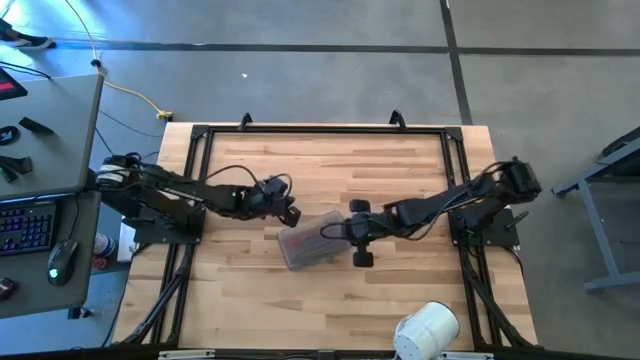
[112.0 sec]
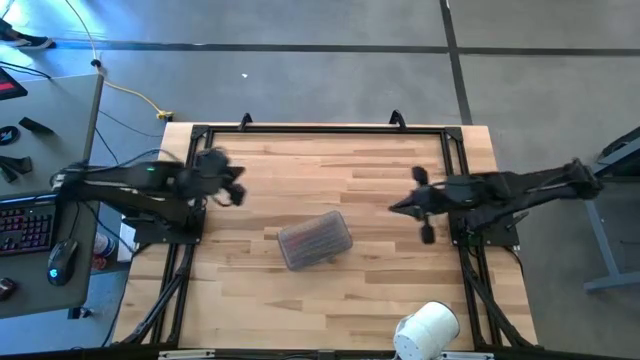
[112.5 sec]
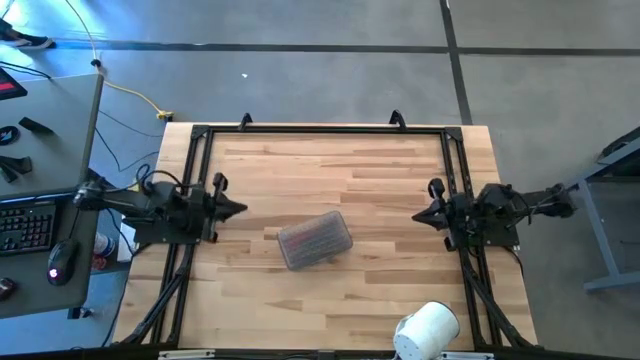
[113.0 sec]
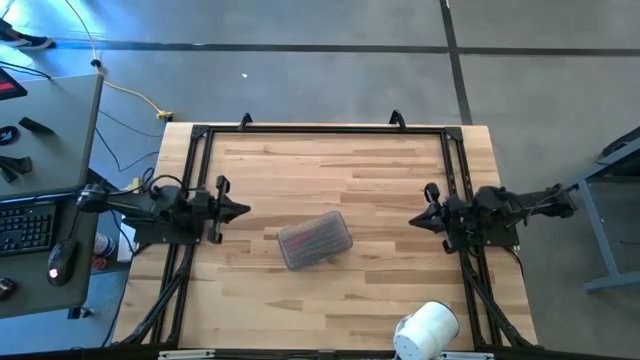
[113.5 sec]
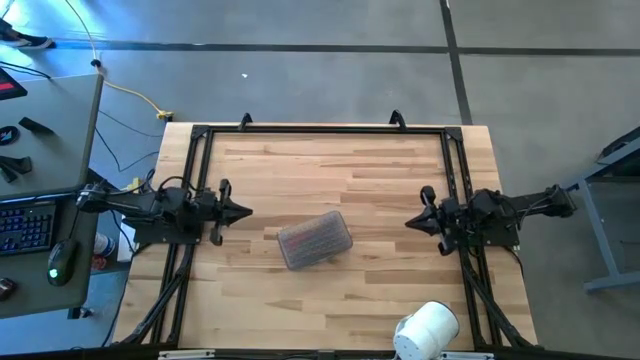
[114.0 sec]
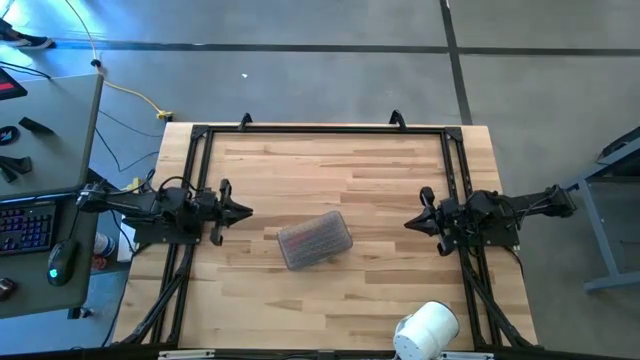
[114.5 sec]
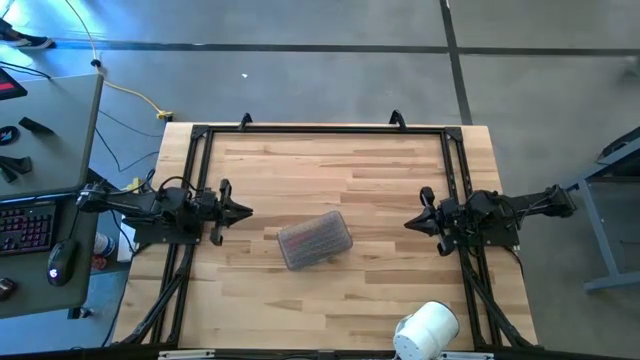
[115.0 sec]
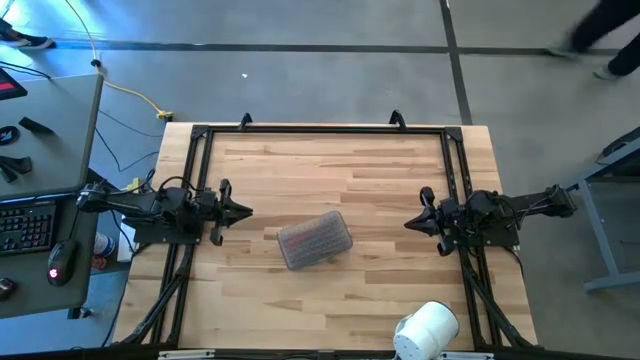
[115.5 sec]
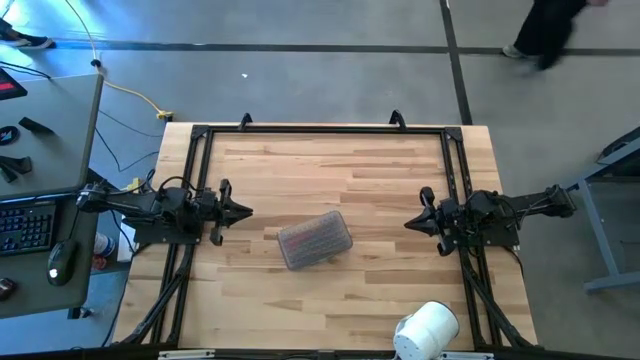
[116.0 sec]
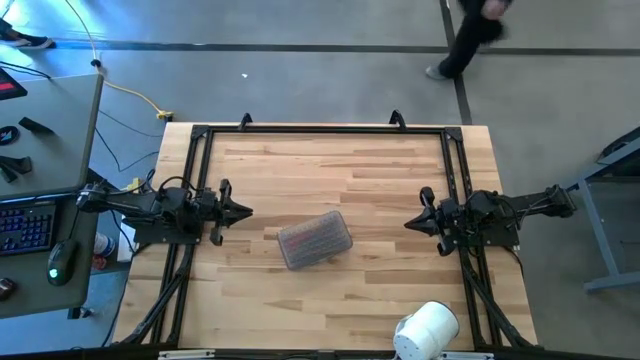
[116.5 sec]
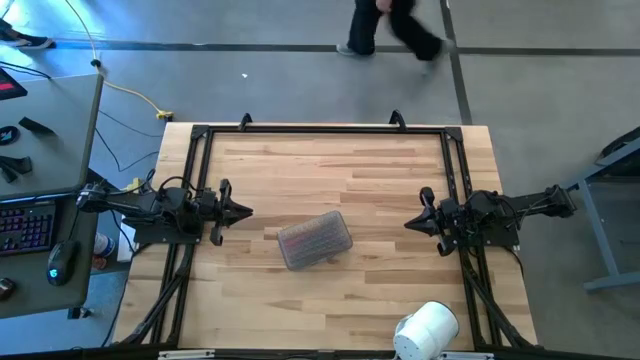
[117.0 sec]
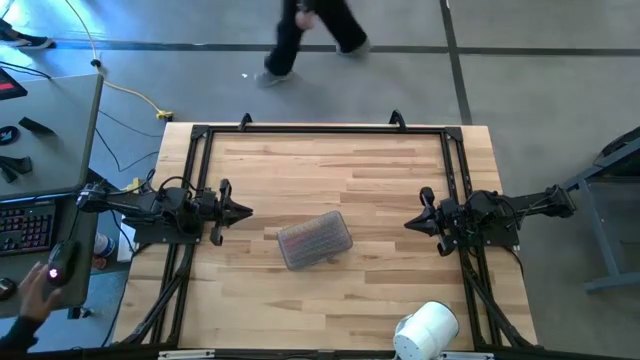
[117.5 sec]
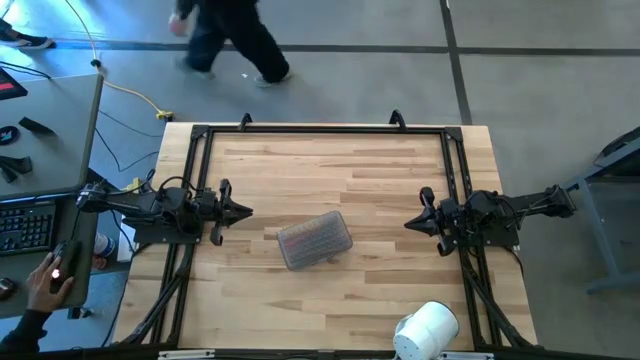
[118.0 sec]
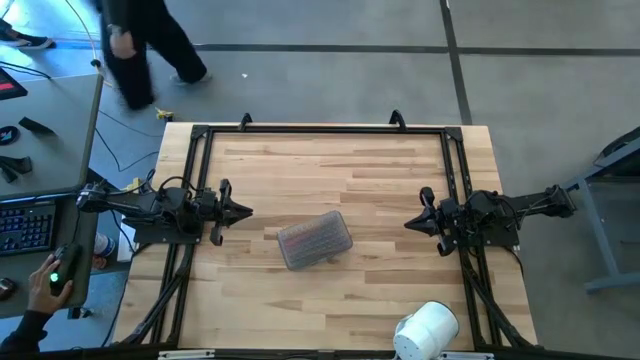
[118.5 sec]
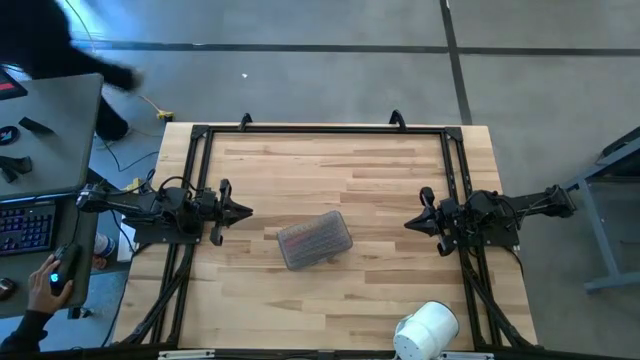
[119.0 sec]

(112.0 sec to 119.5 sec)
Task: Pick & place school supplies into a supply box
Return to Home Position

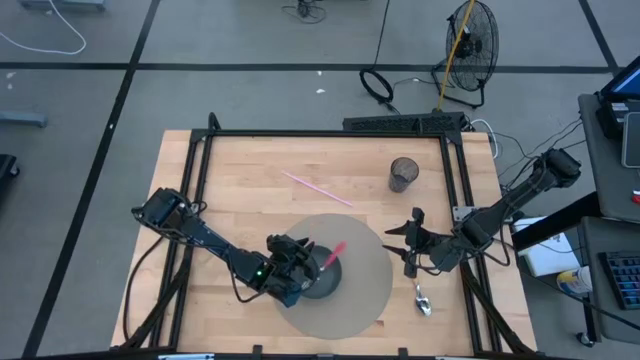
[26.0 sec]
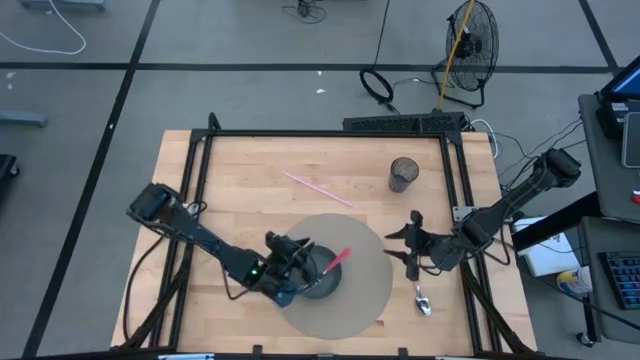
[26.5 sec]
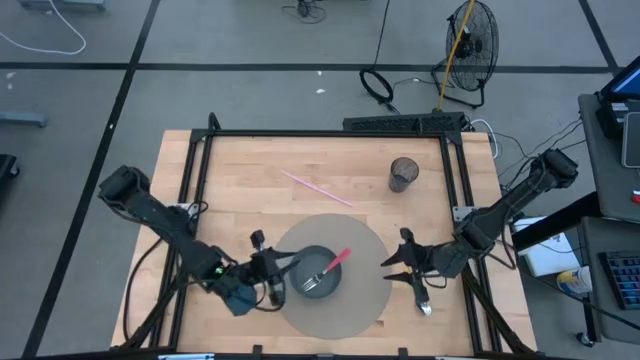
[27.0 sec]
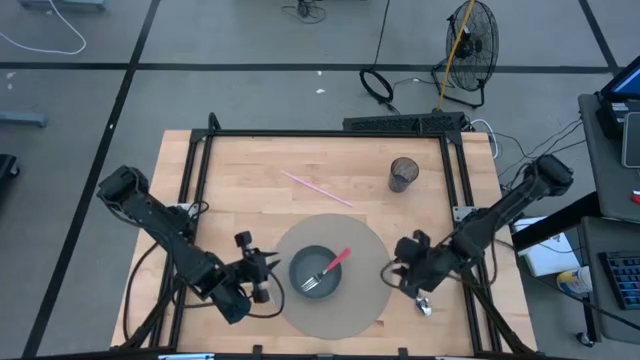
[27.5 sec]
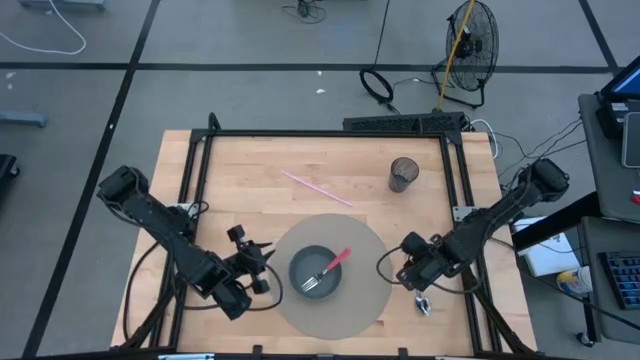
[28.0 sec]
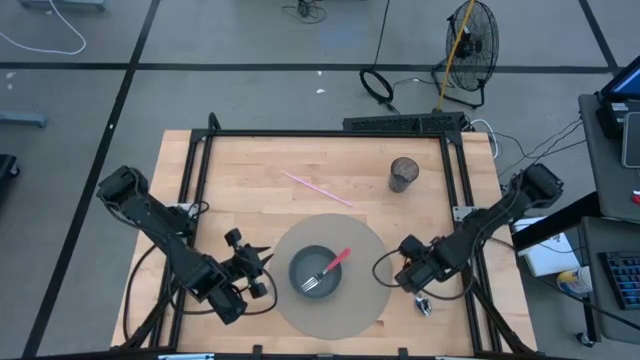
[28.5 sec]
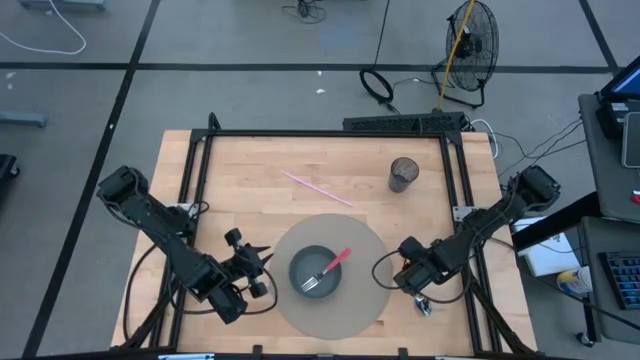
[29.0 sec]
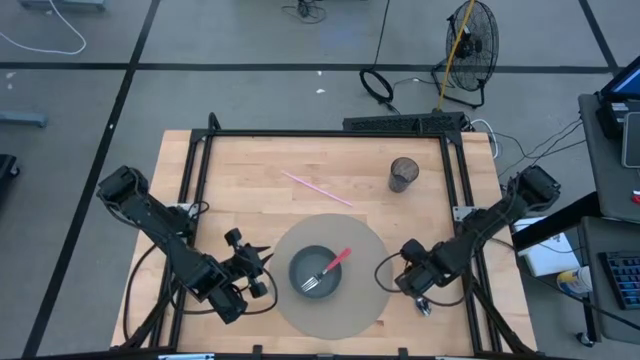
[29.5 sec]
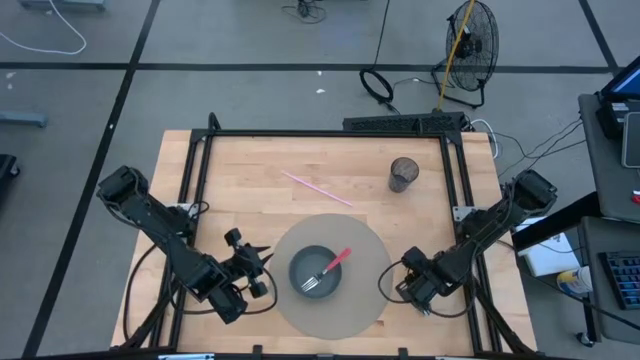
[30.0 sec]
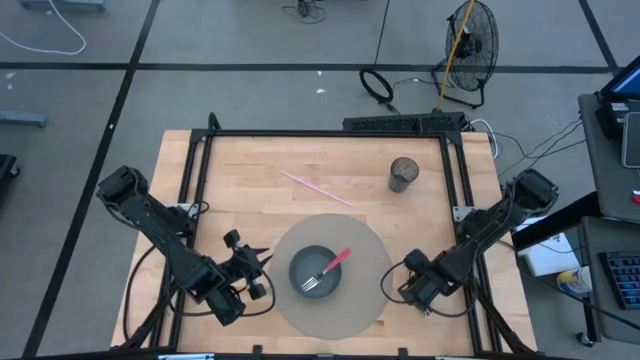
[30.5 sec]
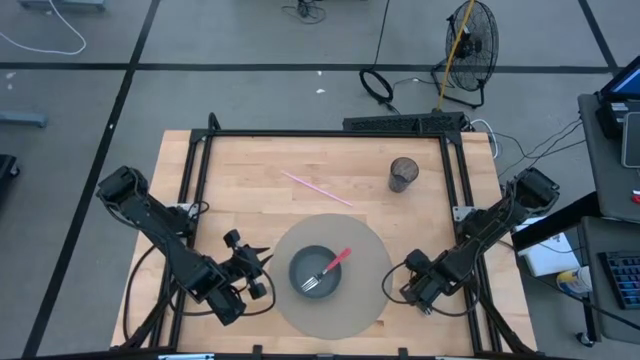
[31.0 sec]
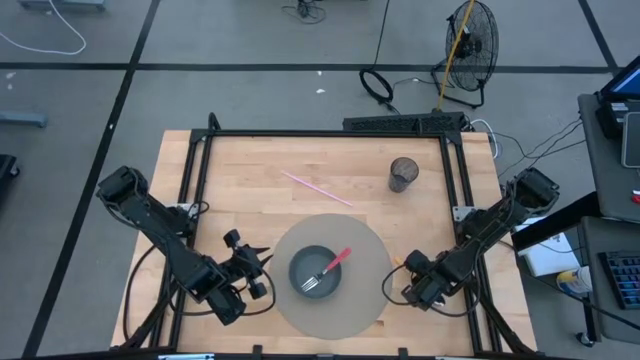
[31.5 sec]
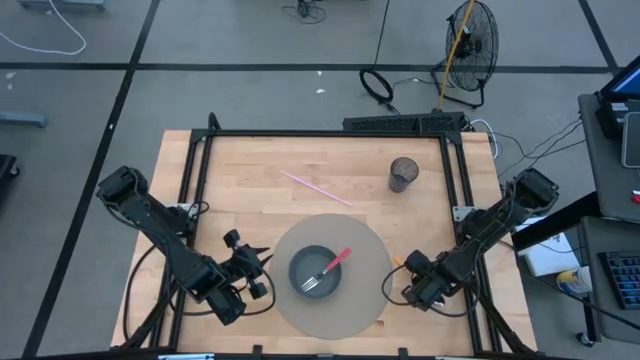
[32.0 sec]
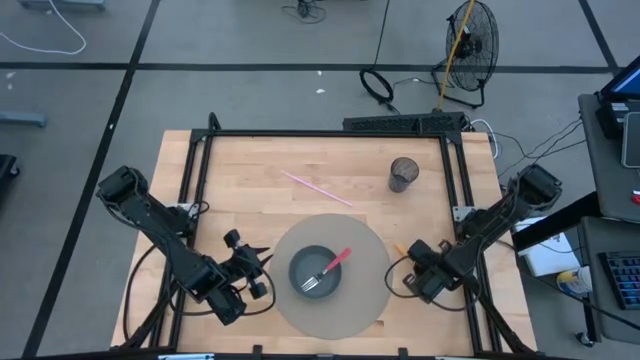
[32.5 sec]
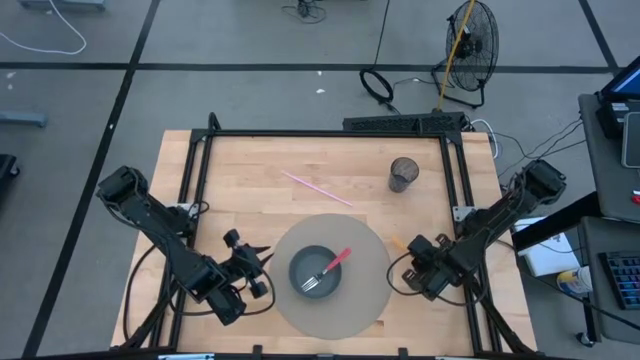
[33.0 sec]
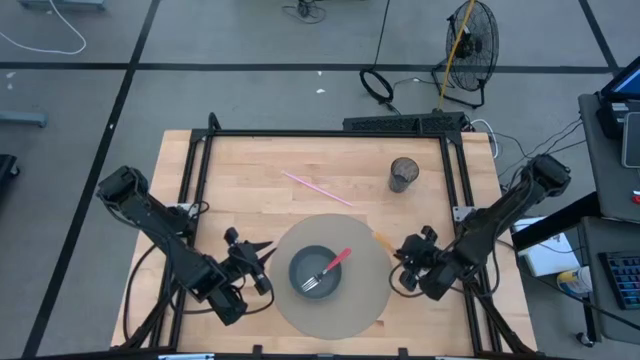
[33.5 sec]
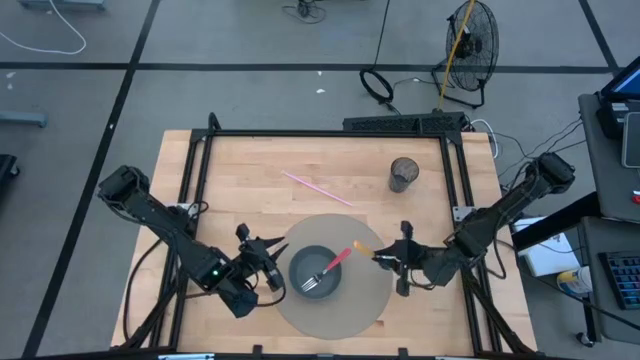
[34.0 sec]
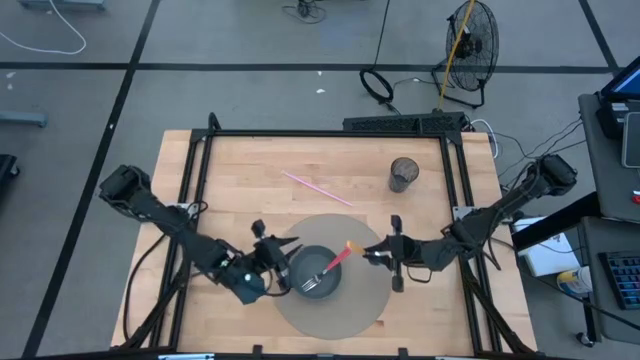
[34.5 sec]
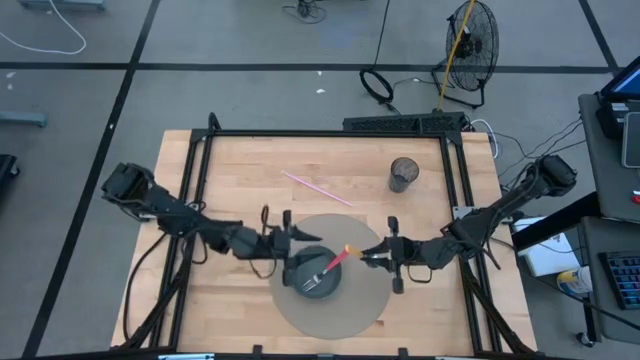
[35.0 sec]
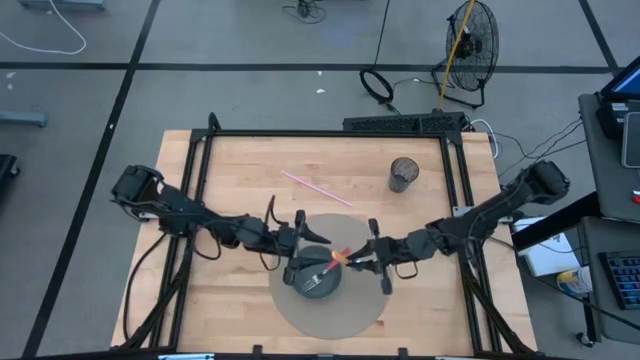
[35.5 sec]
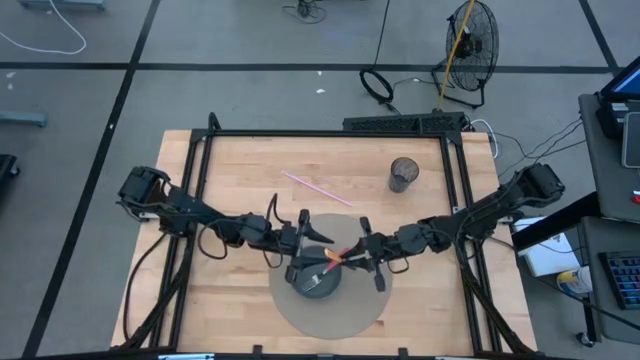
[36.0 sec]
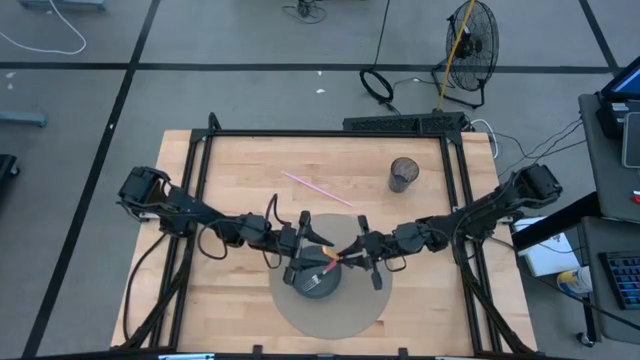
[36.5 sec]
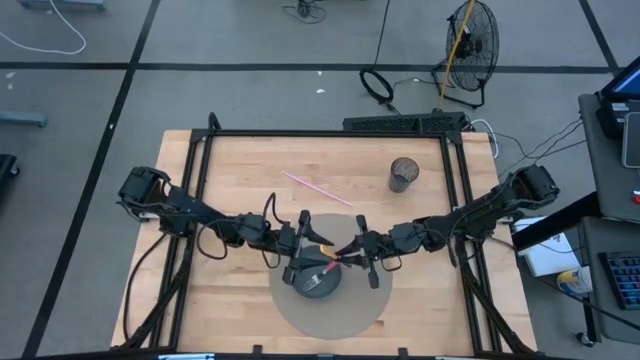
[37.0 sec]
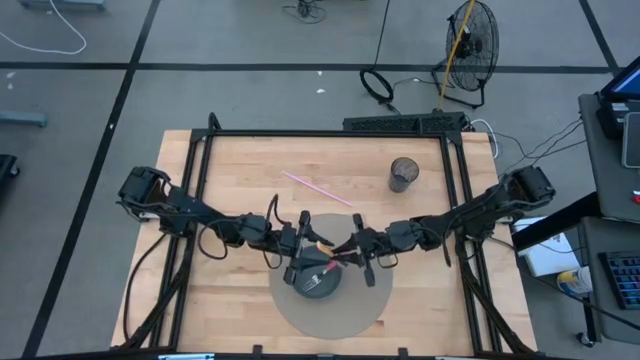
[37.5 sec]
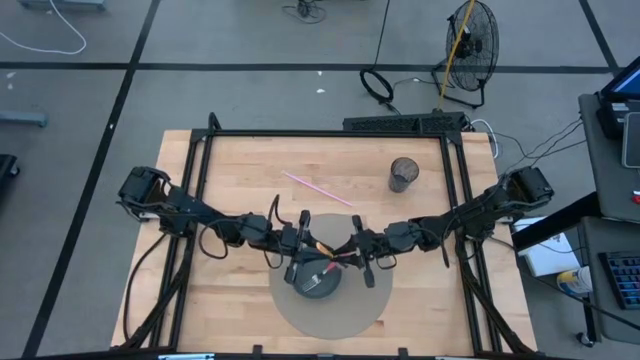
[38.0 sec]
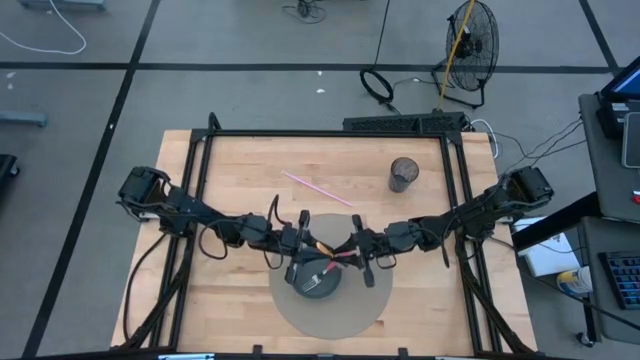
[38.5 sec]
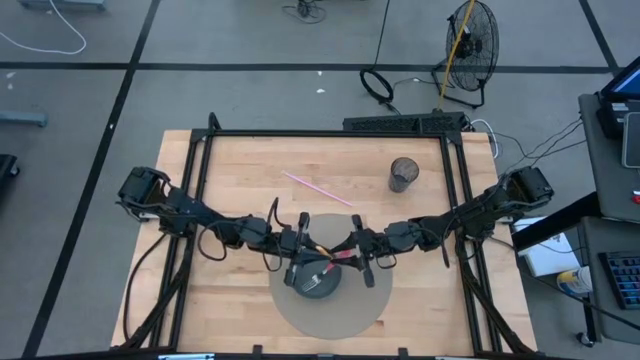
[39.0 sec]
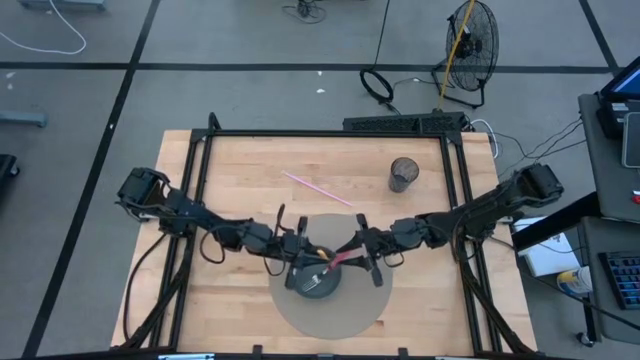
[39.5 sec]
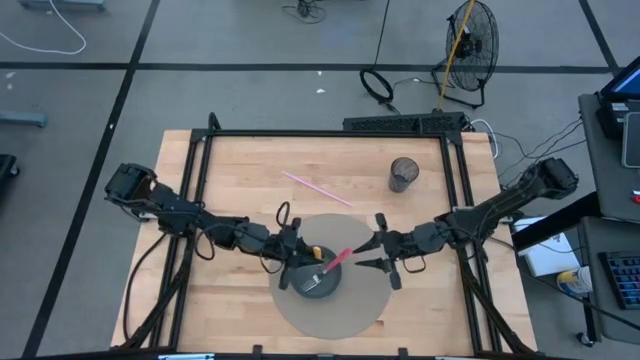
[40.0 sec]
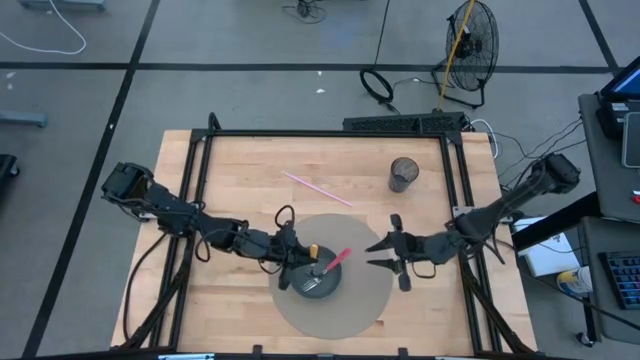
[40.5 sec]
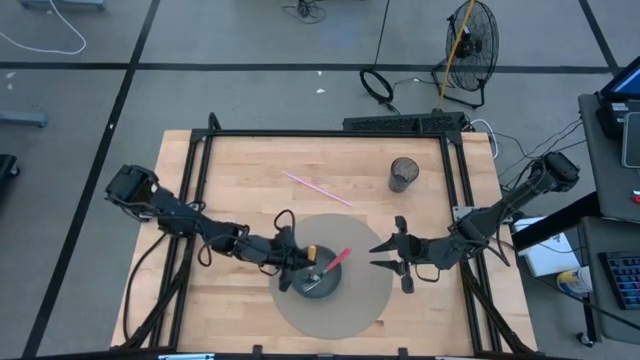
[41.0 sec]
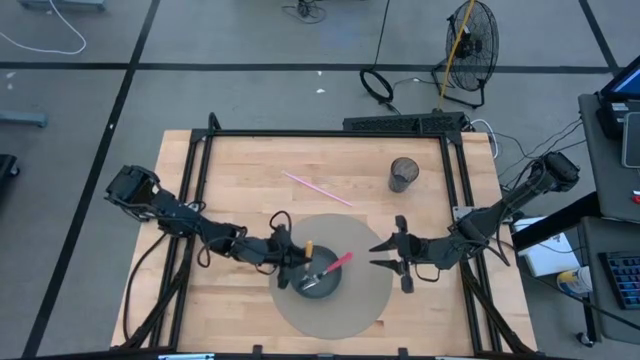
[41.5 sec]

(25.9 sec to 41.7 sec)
Task: Pick & Place Utensil
Put the yellow spoon into the blue bowl on the brown placemat
